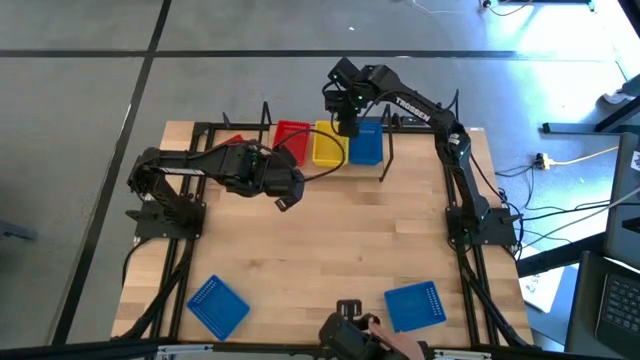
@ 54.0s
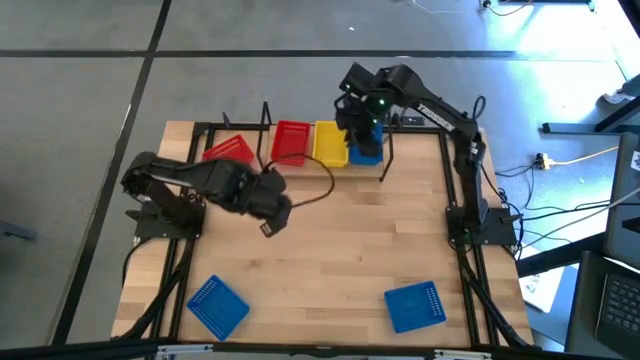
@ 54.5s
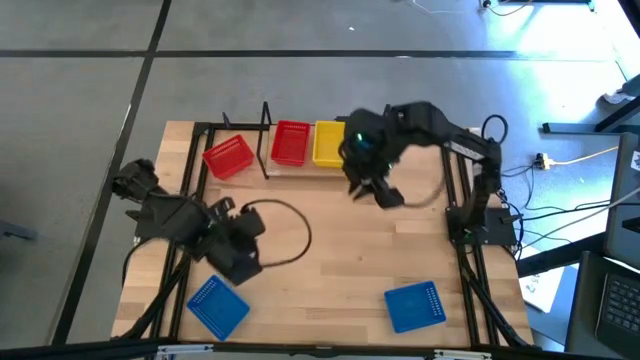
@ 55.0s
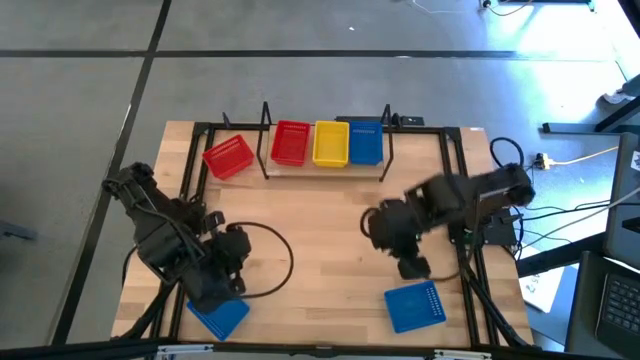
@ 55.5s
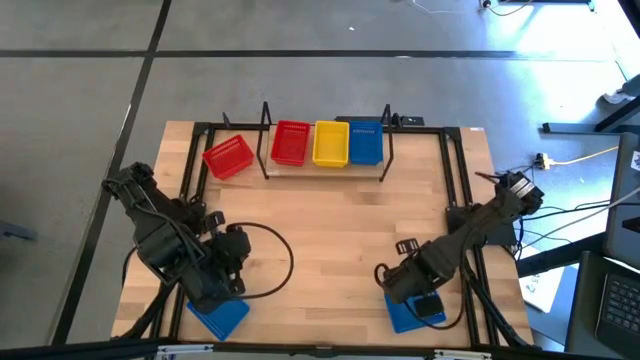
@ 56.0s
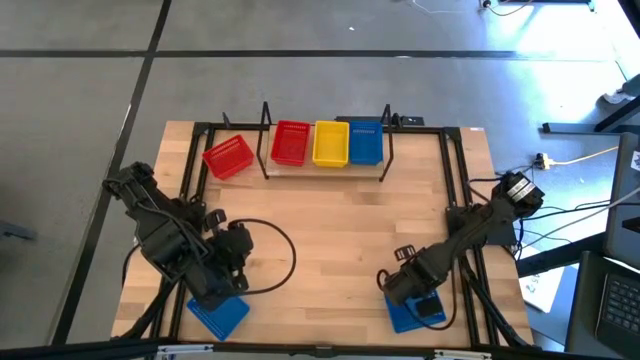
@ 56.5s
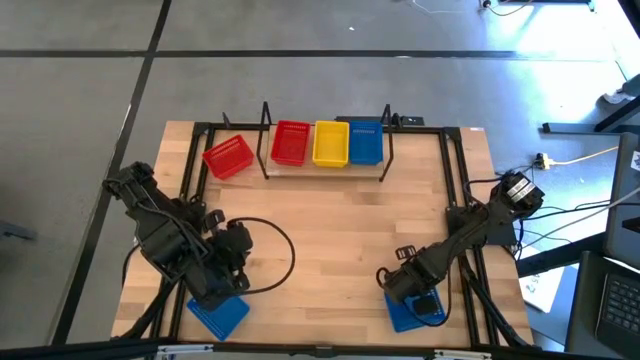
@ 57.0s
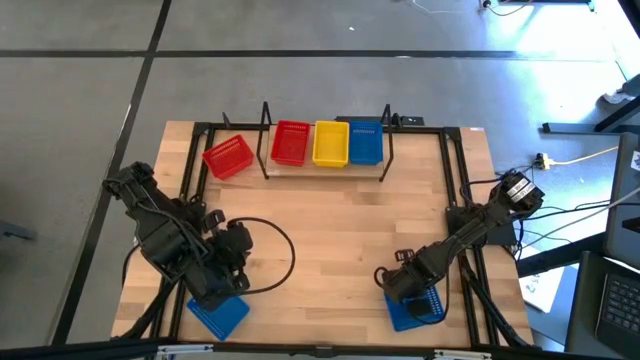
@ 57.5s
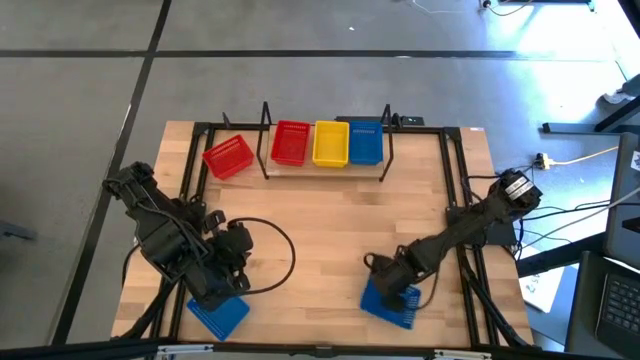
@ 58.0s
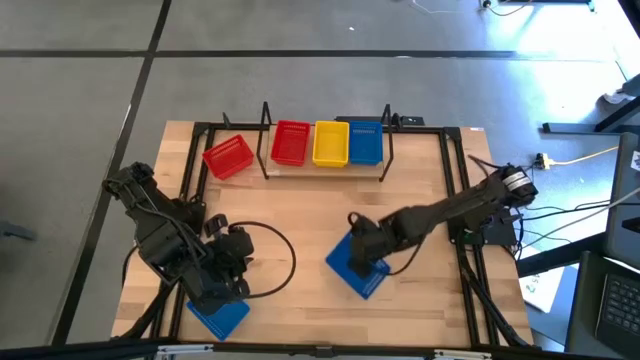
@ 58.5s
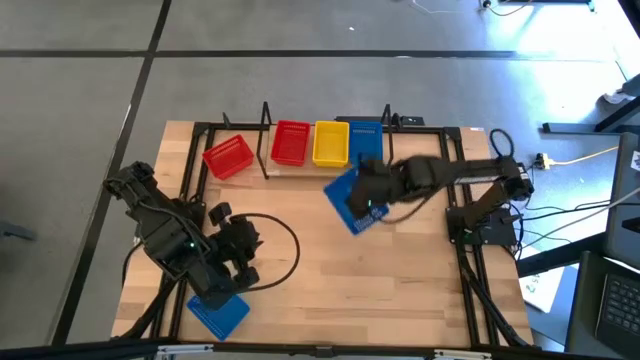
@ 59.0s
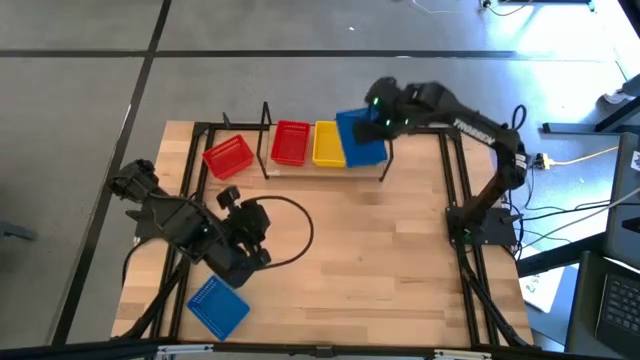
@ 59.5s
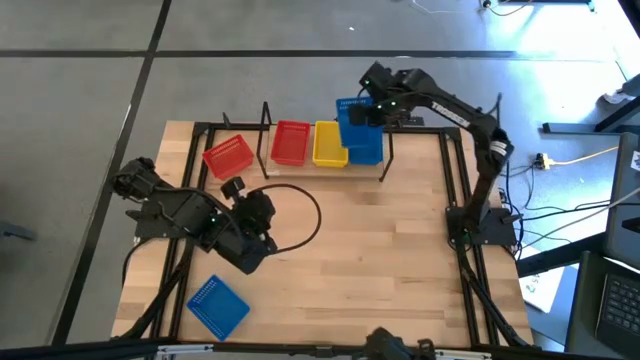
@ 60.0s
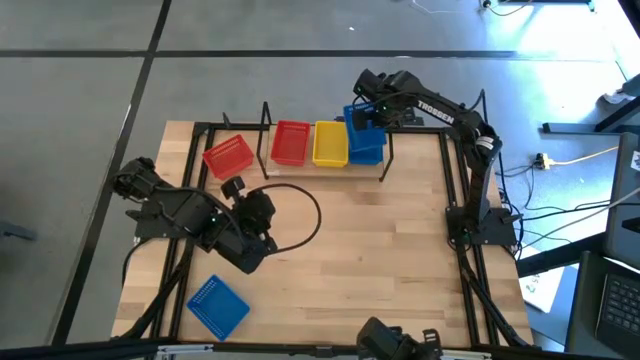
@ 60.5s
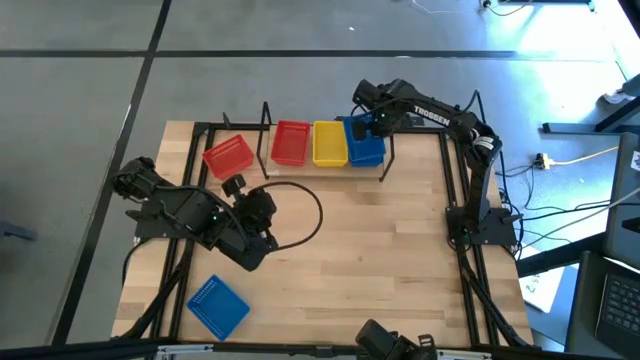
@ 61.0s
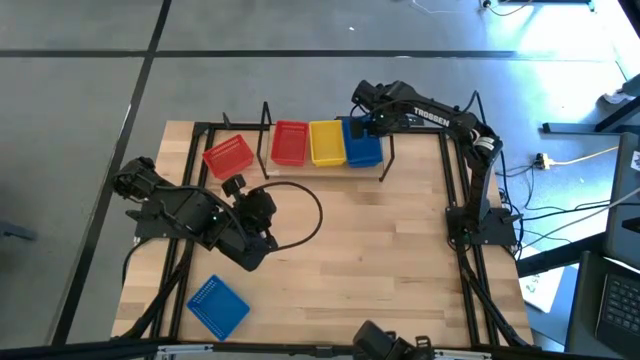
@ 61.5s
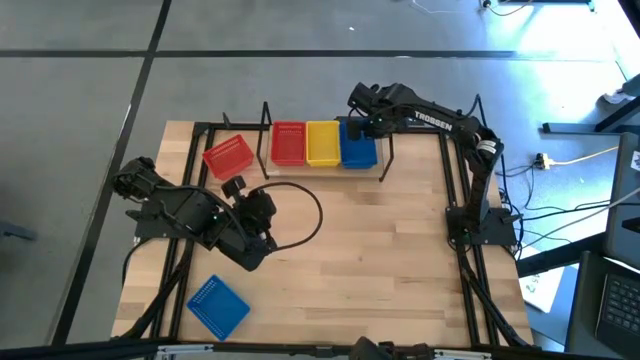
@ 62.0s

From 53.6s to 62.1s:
Task: Stack baskets on shelf by color
Stack the right blue bin on the blue bin on the shelf

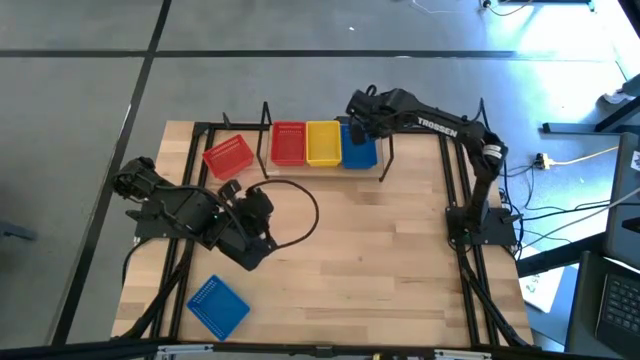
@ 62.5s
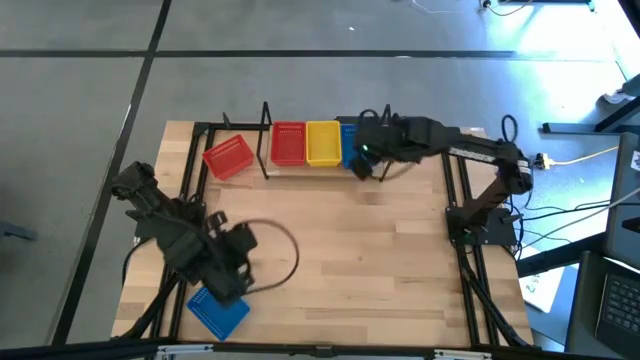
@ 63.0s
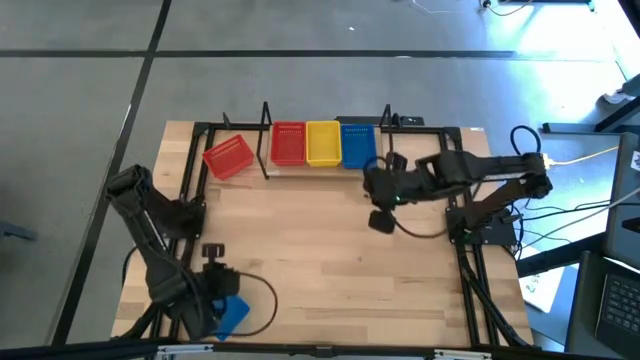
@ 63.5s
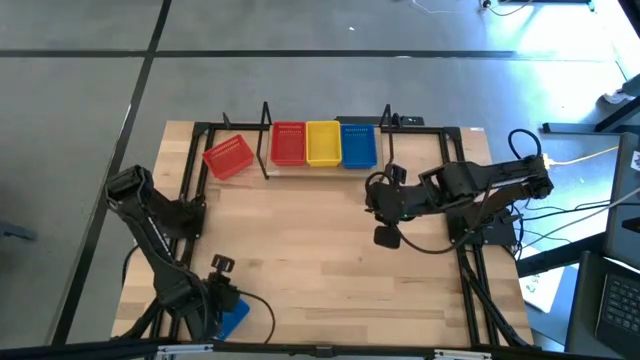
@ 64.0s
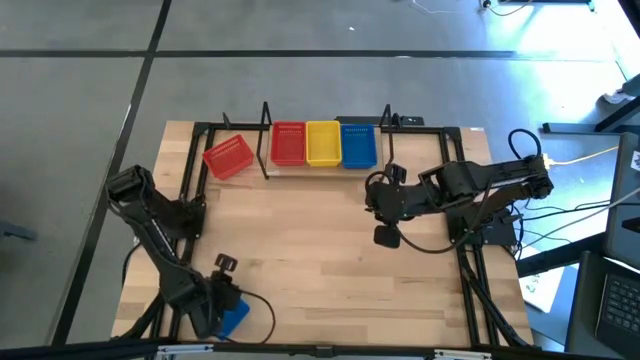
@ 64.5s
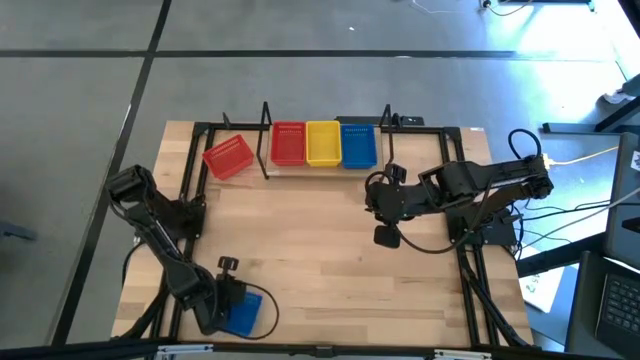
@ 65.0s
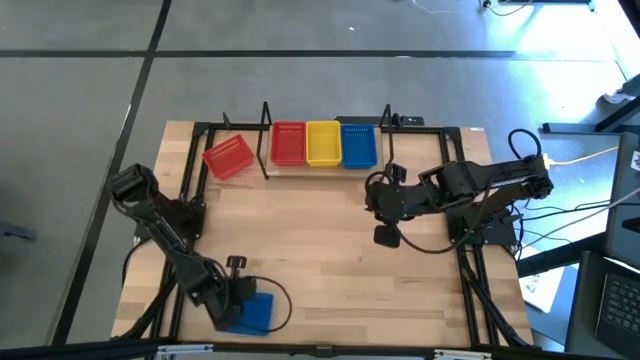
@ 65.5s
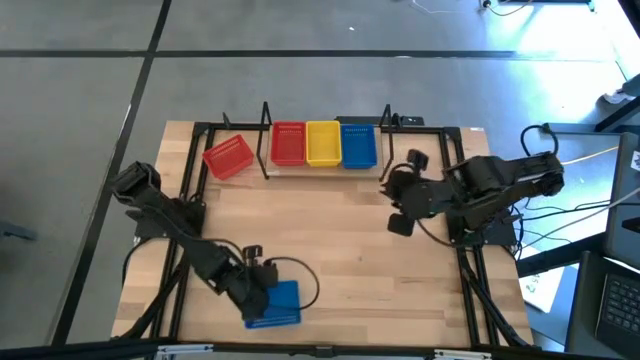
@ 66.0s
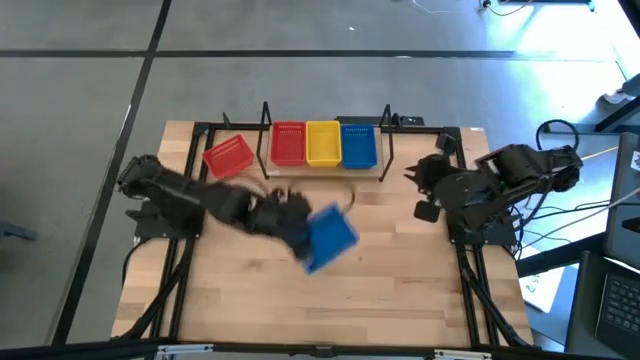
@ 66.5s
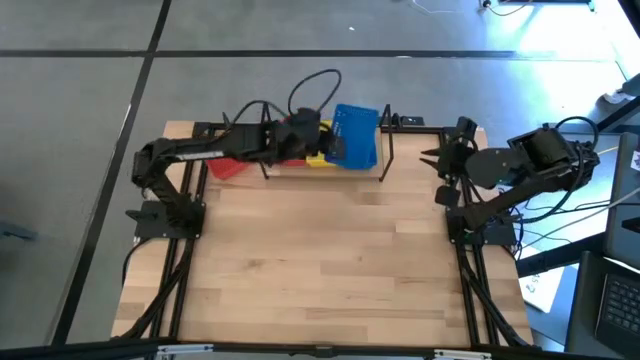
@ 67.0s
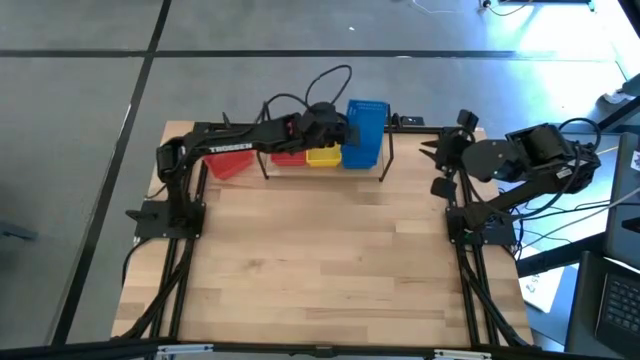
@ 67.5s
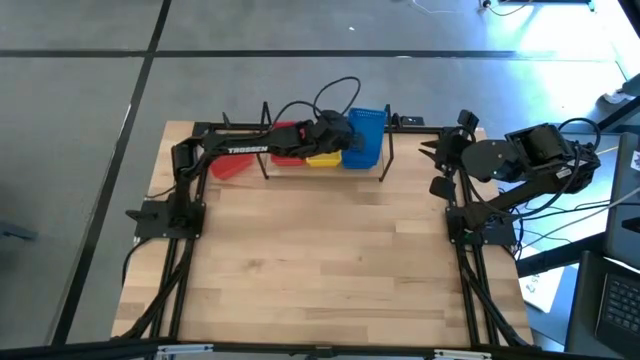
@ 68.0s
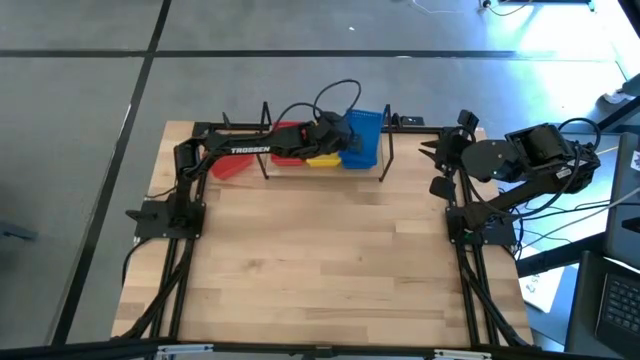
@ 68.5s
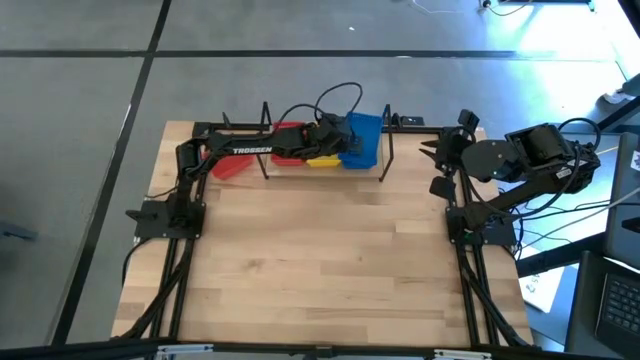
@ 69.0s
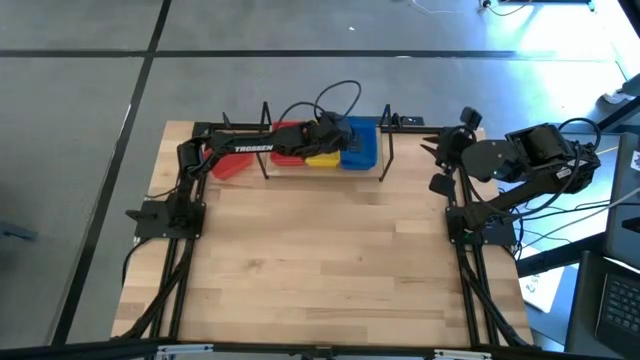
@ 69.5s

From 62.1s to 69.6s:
Stack the blue bin on the blue bin on the shelf

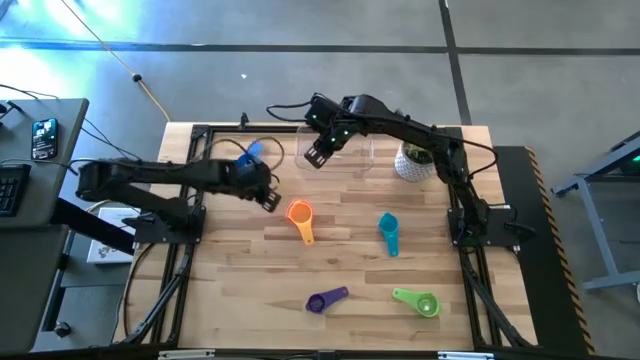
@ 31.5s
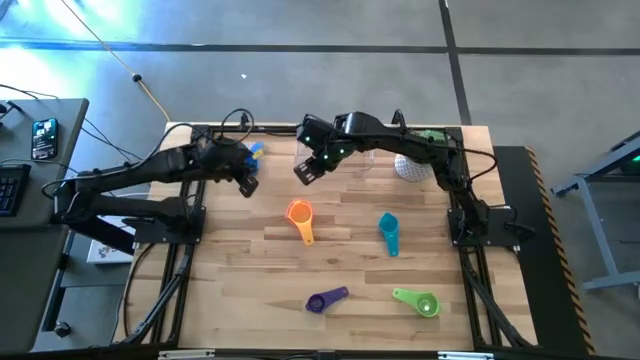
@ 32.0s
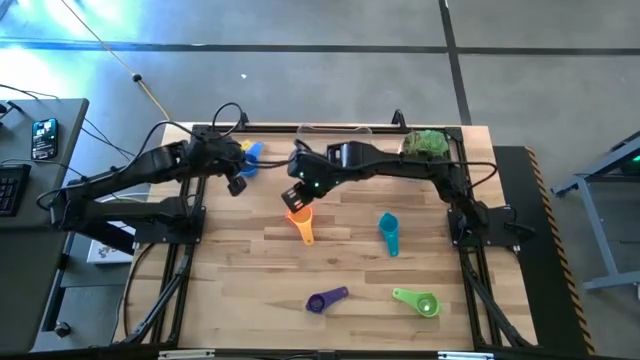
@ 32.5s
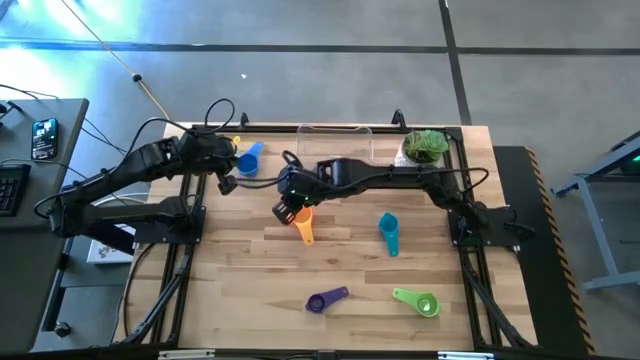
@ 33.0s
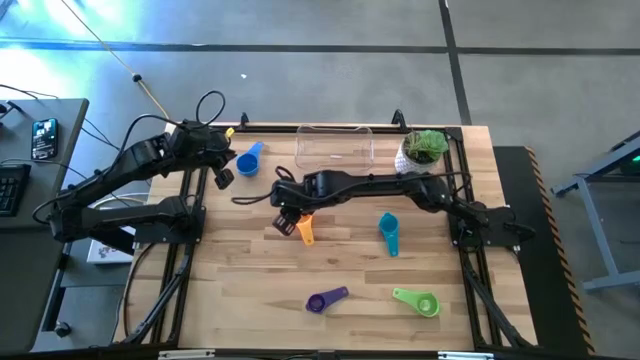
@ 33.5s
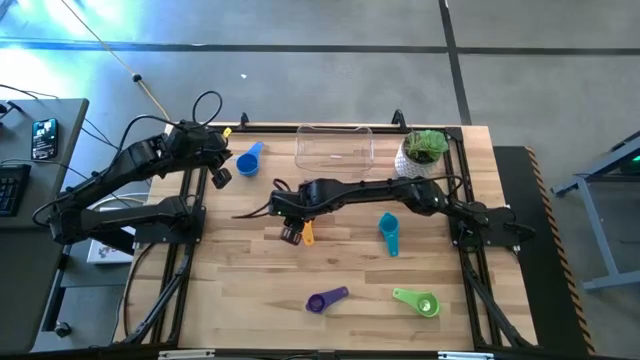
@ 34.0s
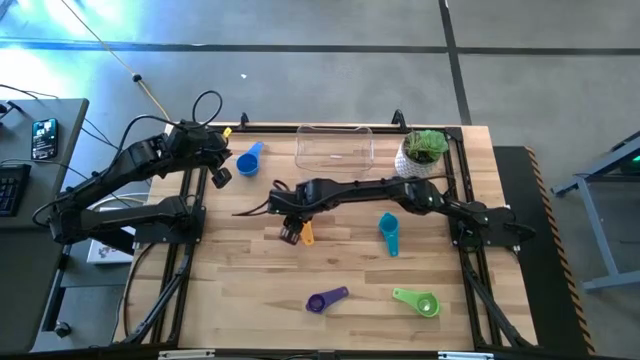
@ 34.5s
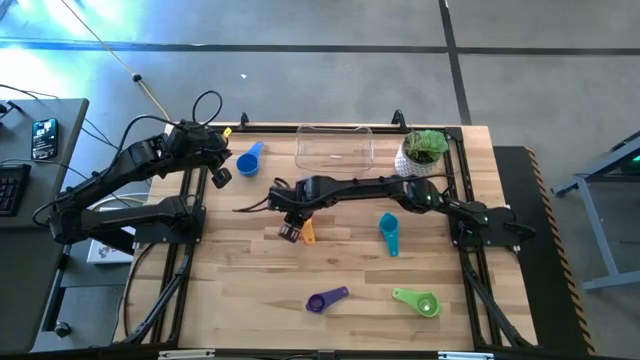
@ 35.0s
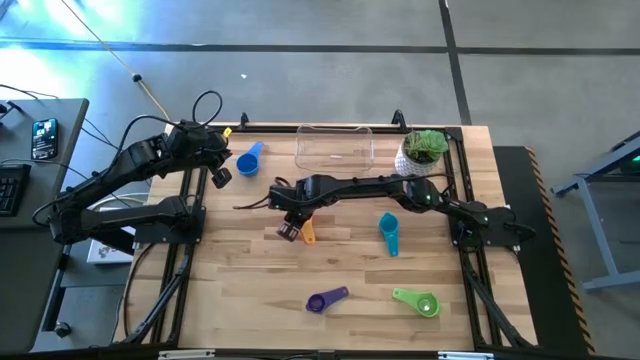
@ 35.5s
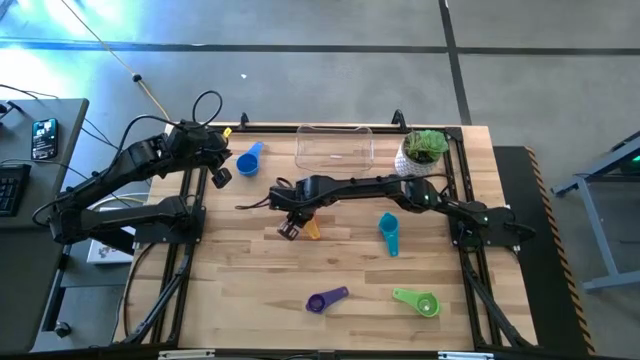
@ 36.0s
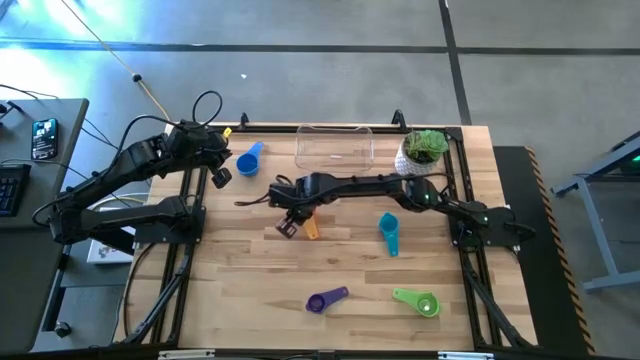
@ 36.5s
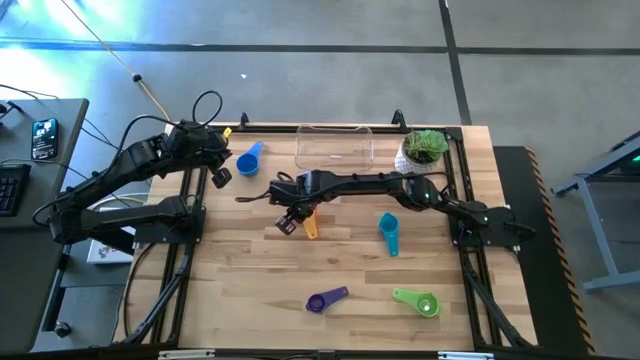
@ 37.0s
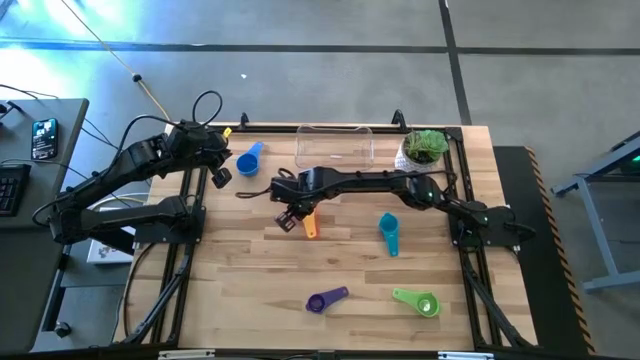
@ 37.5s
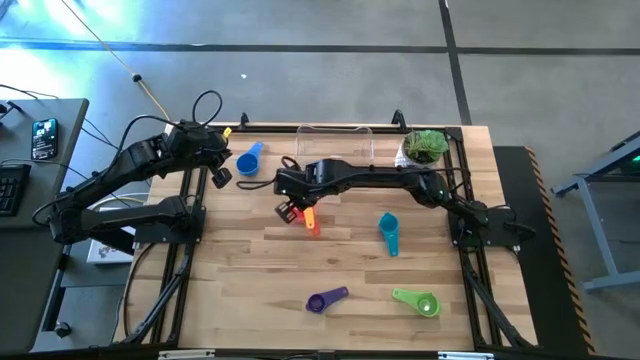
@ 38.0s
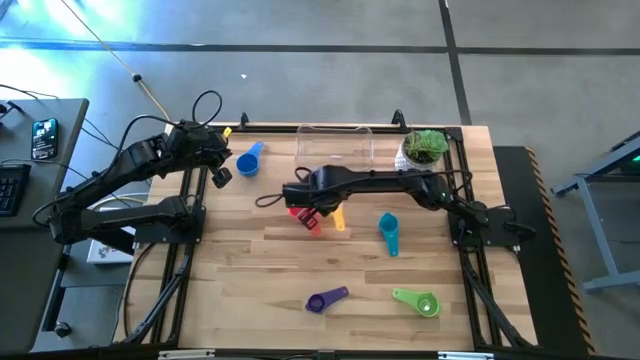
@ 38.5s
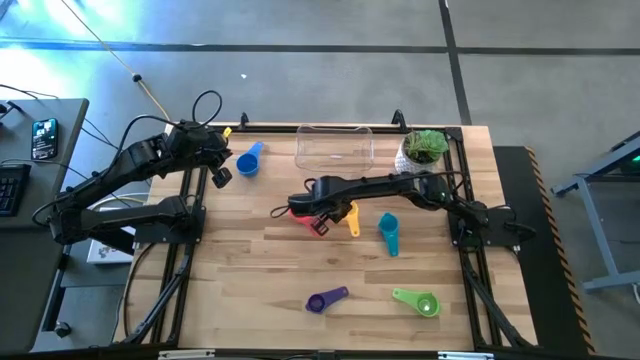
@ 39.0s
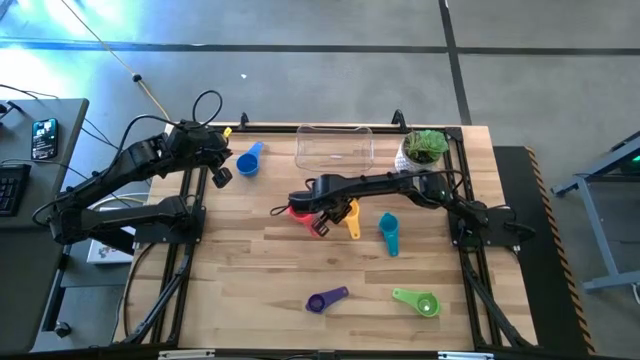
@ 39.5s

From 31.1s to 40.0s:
Task: Nest measuring cups in basket
Remove the yellow measuring cup from the top of the red measuring cup
